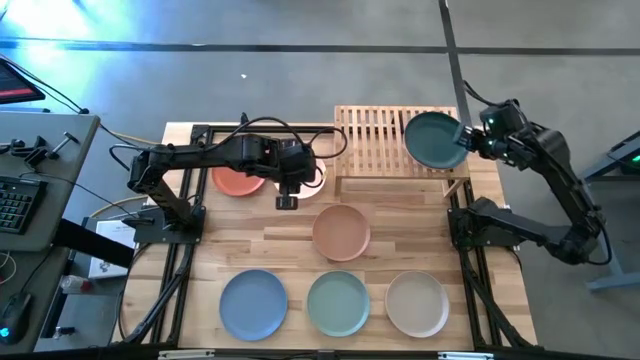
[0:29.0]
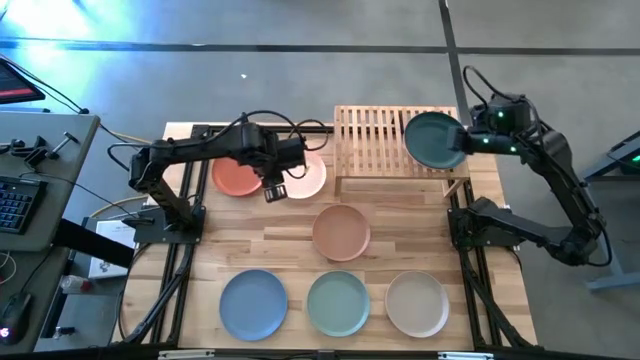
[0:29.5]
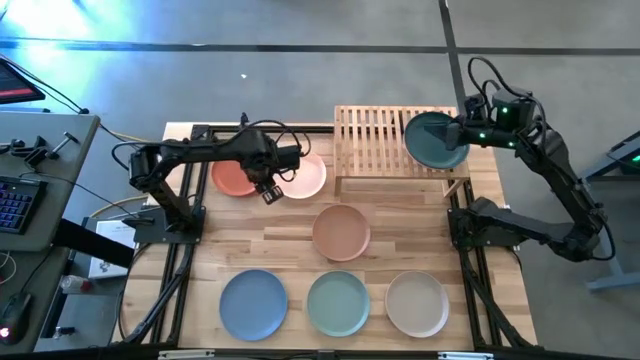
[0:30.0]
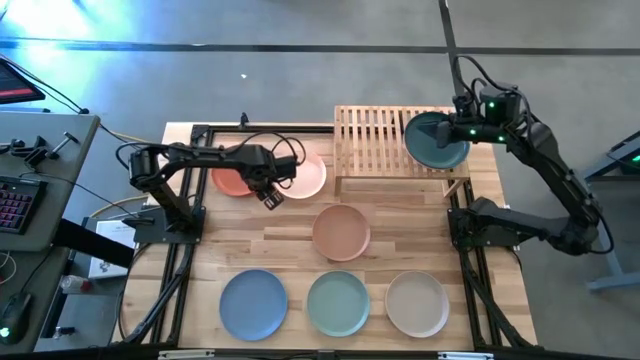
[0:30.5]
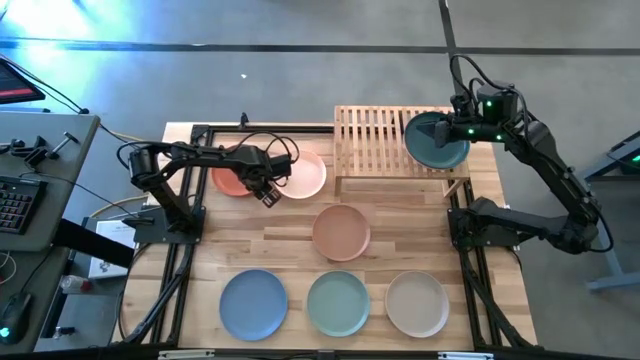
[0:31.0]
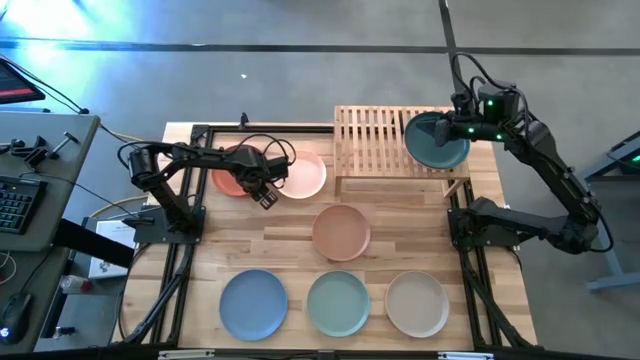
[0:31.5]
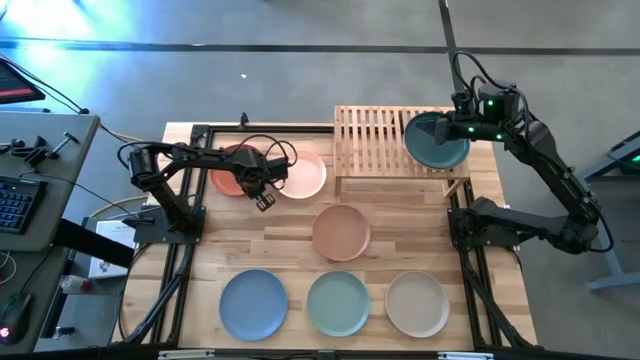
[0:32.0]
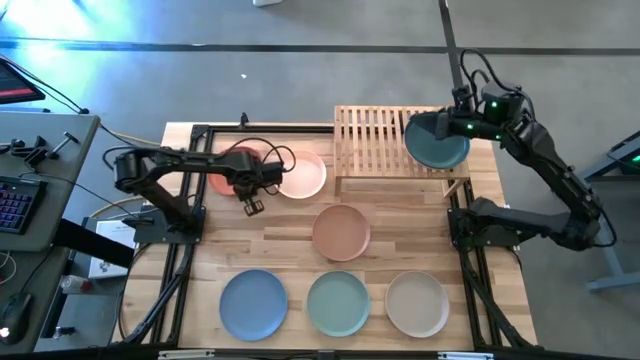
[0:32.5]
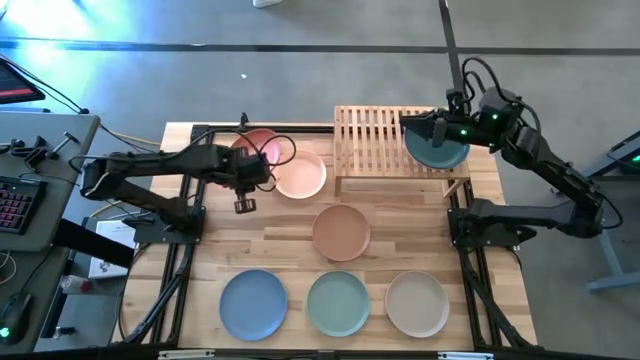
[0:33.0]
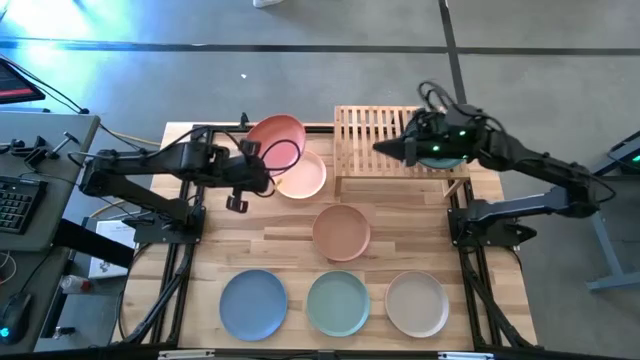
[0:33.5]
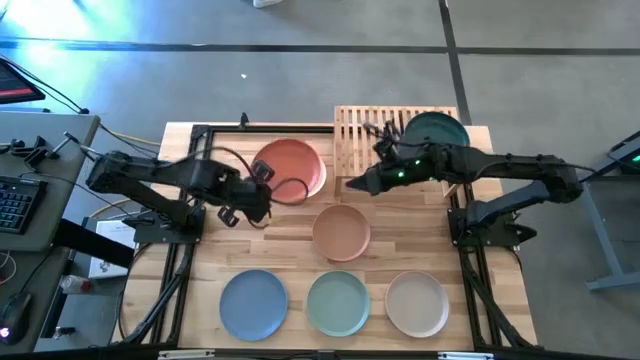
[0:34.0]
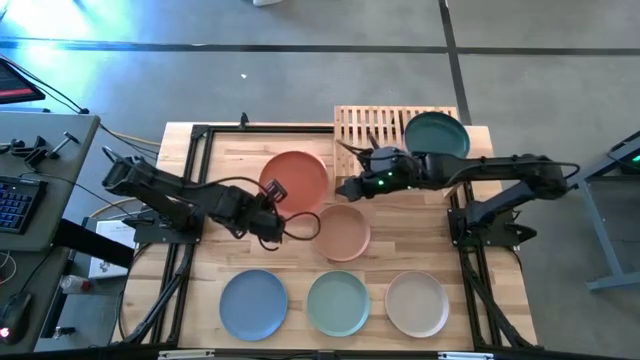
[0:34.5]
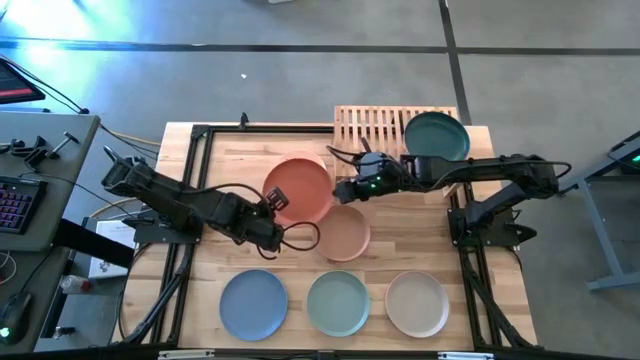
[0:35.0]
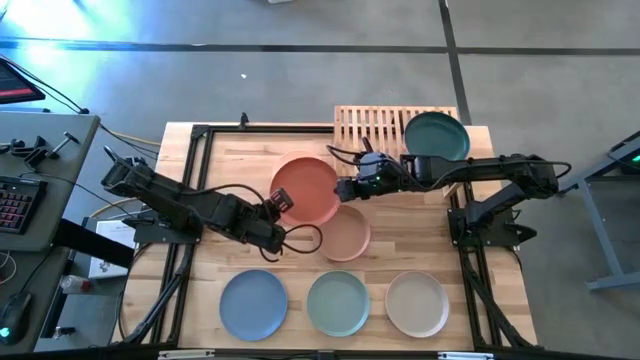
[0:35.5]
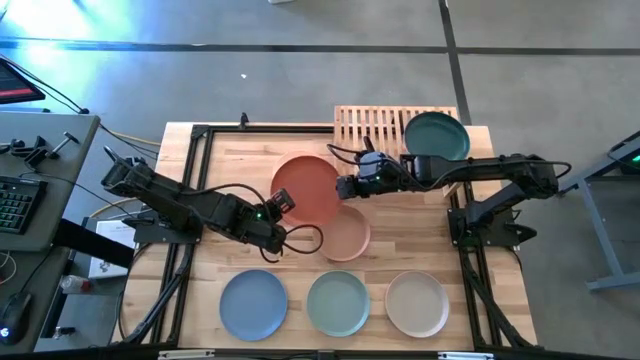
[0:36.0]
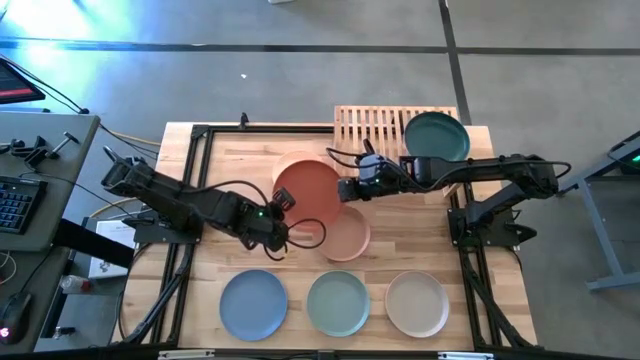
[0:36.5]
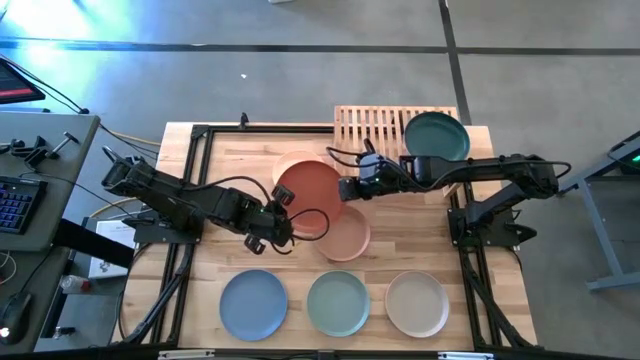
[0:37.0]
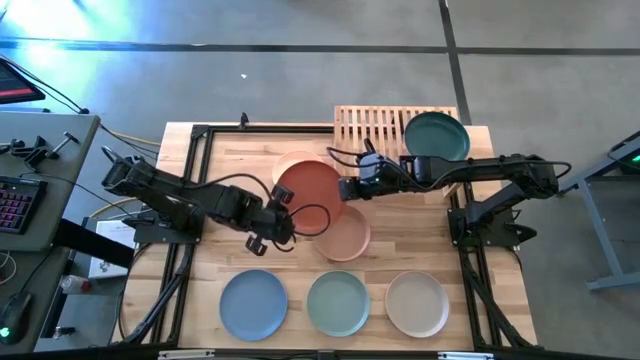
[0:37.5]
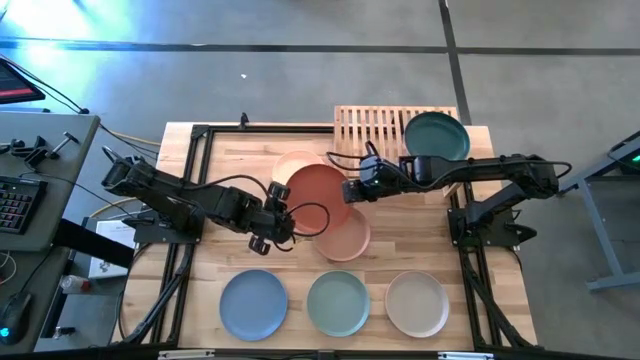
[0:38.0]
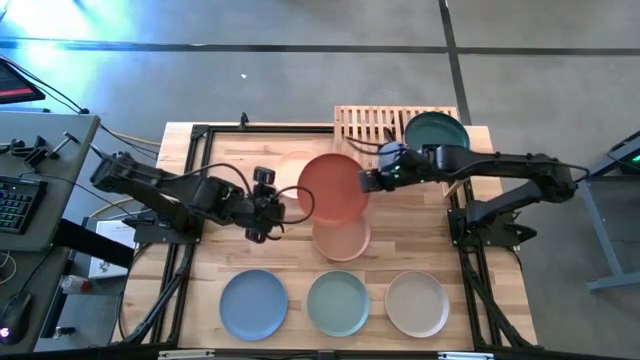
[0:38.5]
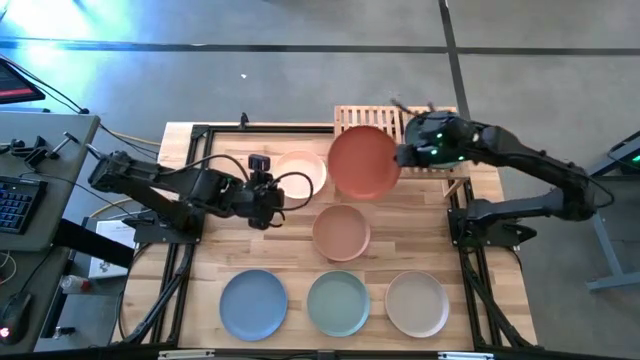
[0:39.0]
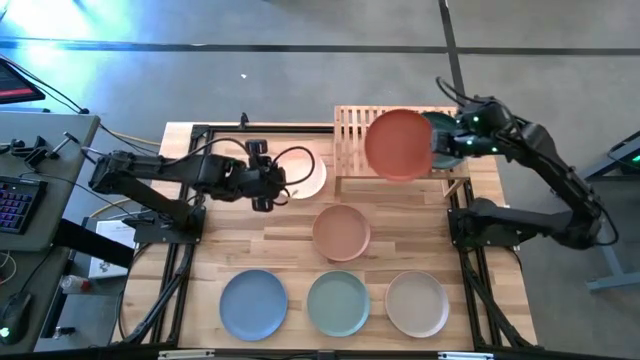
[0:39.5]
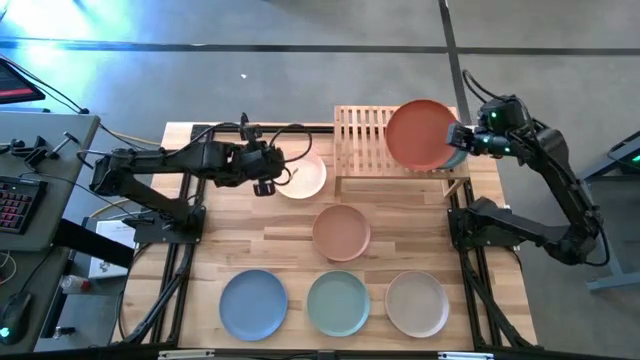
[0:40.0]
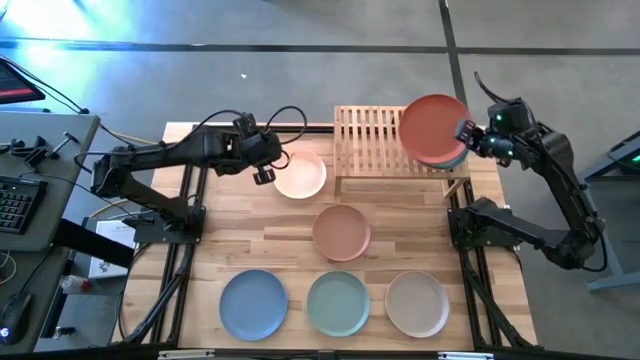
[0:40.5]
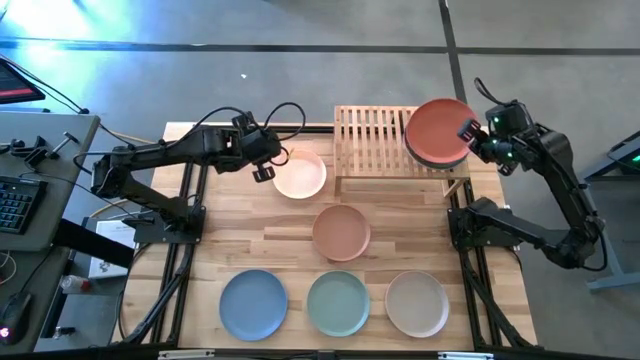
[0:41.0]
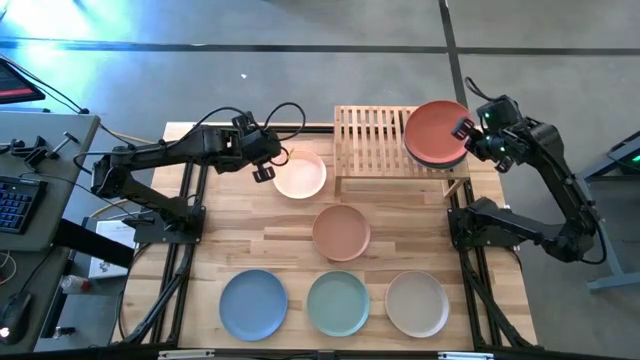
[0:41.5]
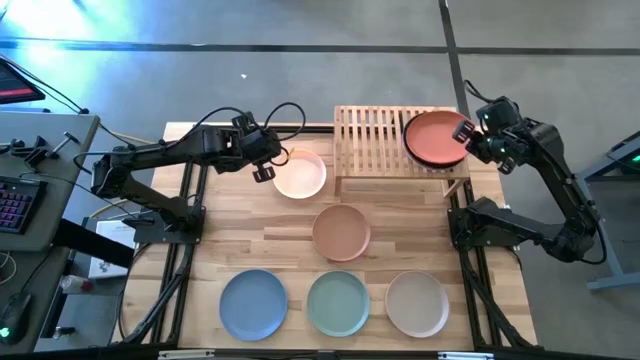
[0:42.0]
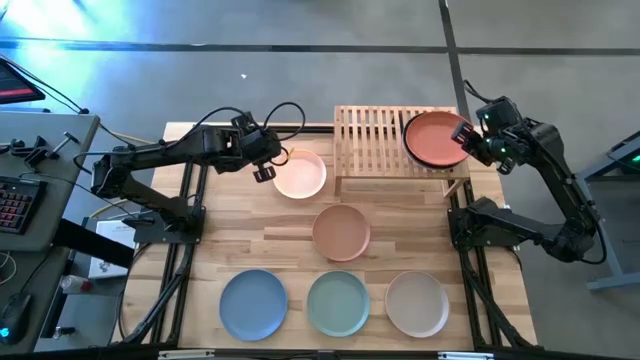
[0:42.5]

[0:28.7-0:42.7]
Task: Place and stack plates onto a shelf
Stack the orange plate on top of the green plate on the shelf

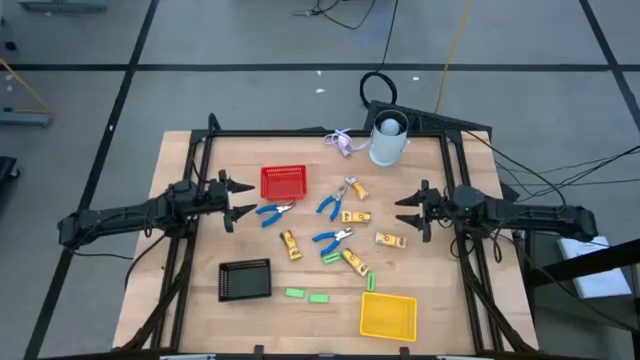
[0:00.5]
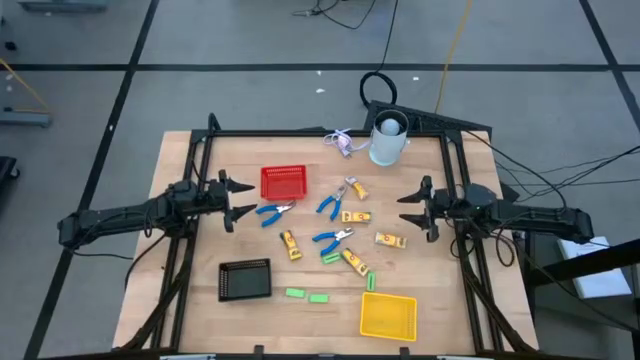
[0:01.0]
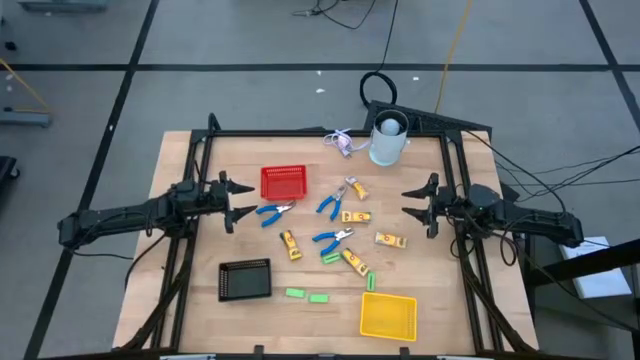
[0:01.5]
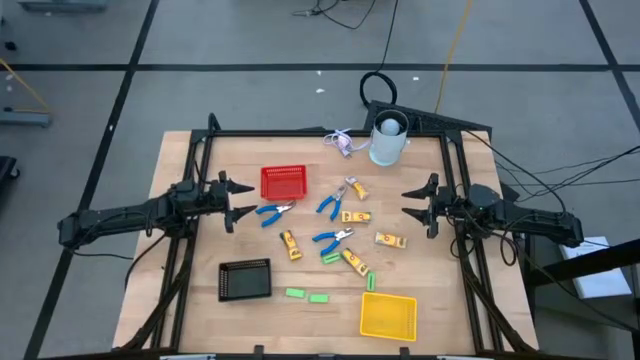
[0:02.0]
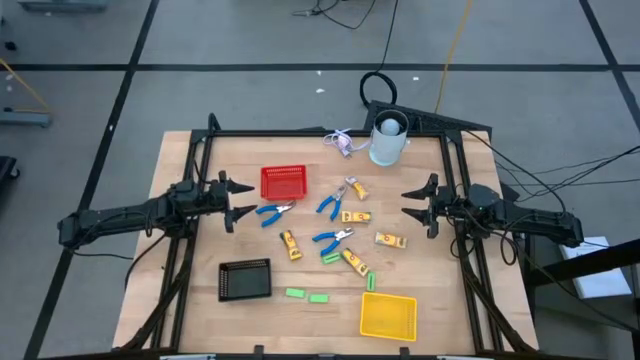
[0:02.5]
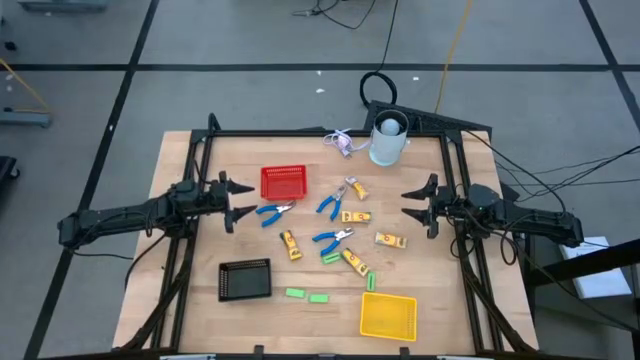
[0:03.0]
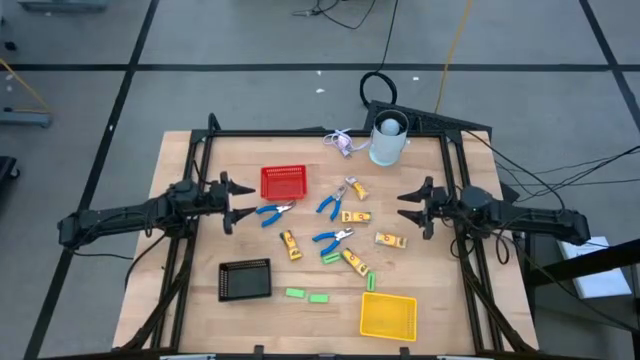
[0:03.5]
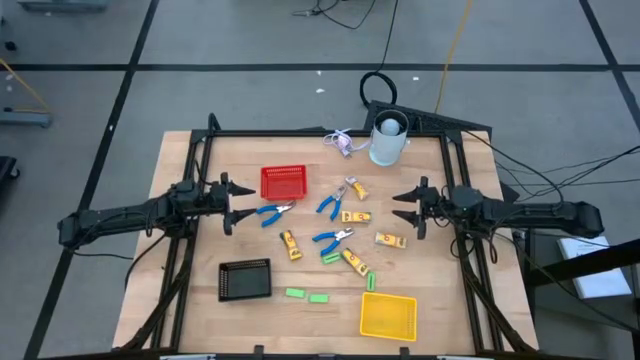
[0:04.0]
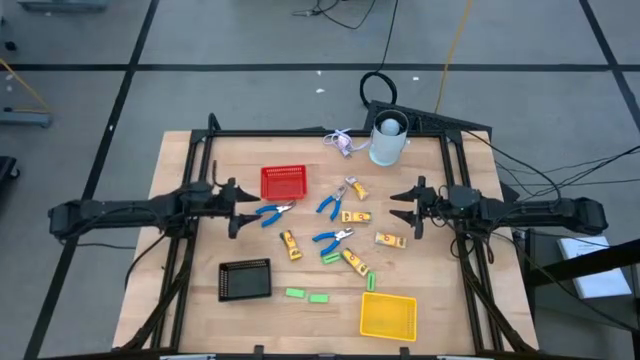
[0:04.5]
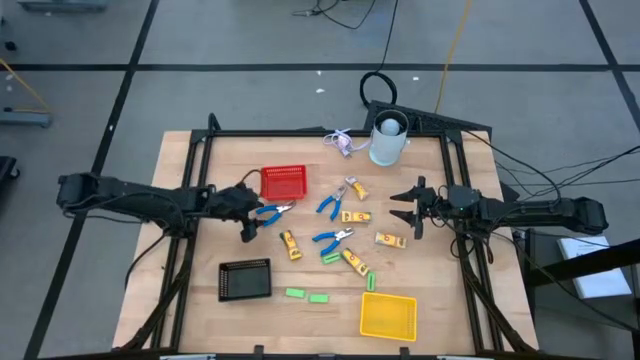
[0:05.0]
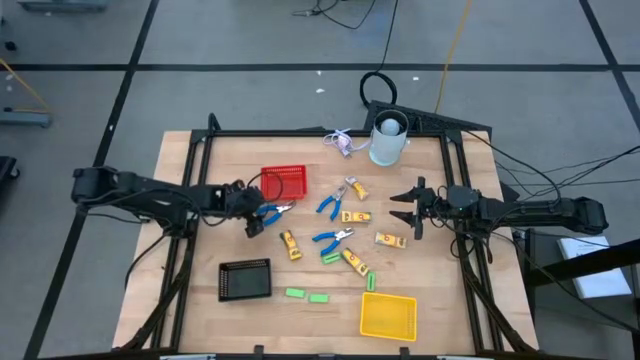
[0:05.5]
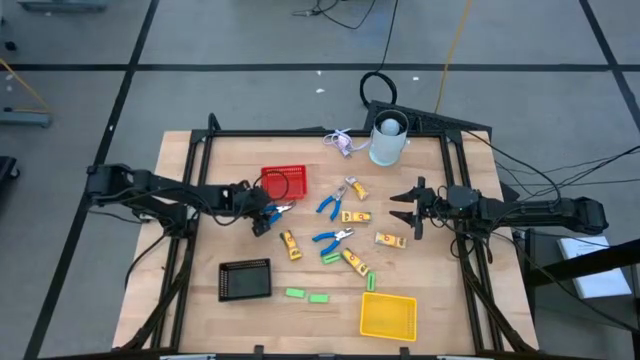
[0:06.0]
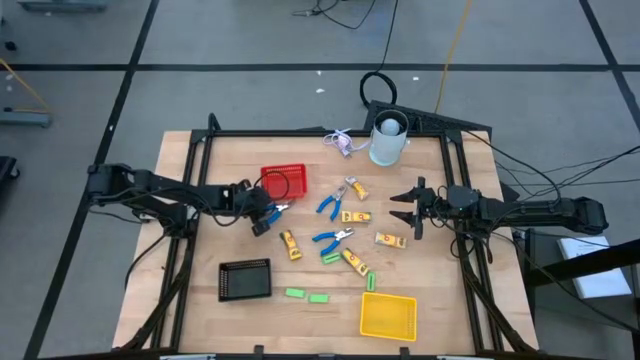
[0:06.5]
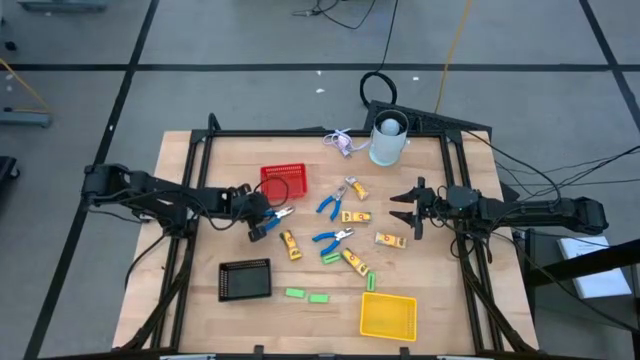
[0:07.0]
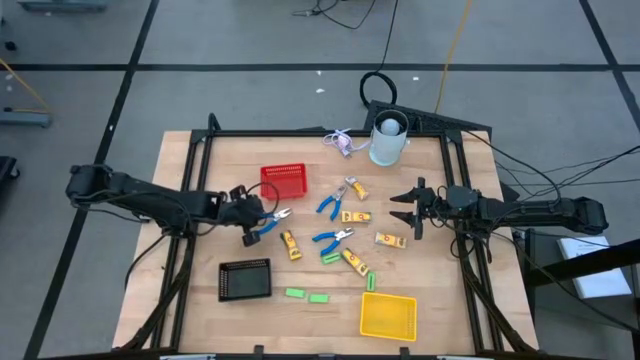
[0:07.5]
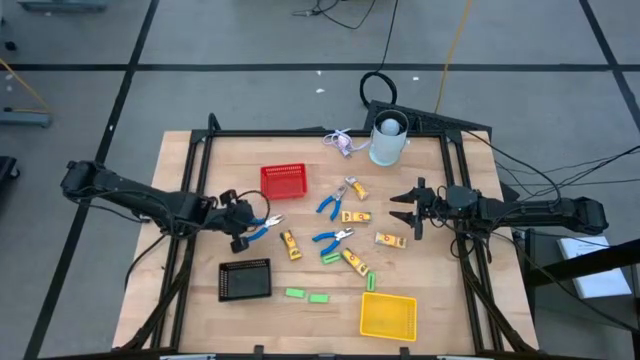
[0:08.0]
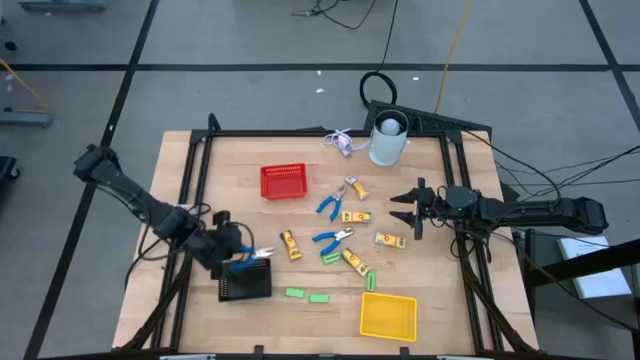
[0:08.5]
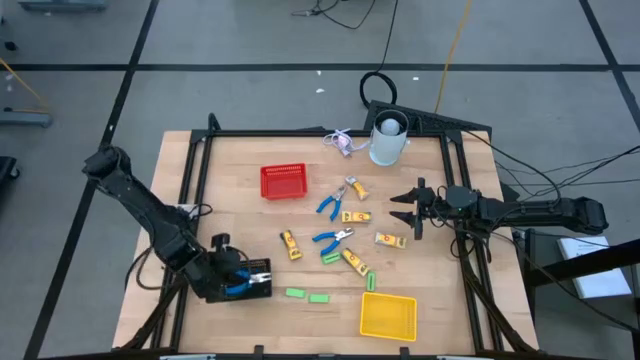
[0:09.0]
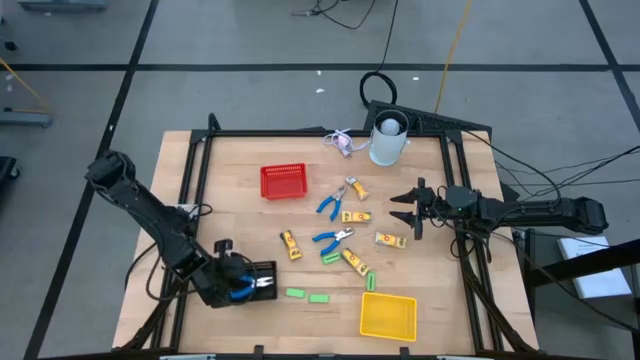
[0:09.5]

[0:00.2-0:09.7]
Task: Pick & Place School Supplies
Put the blue hole punch into the black bin
